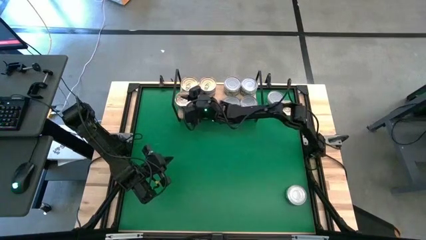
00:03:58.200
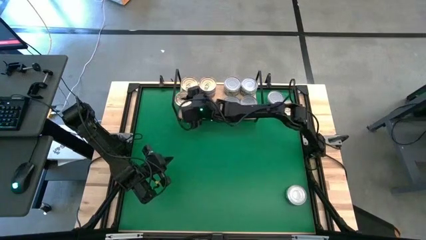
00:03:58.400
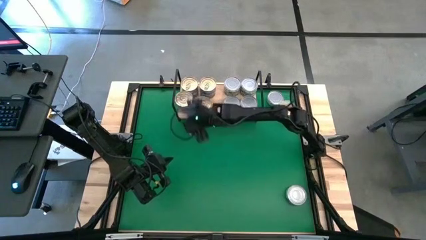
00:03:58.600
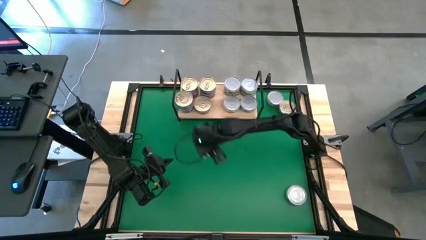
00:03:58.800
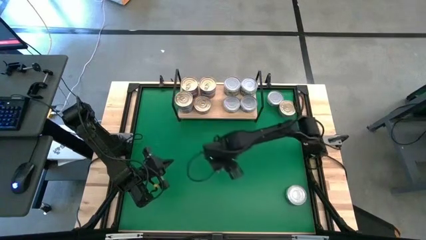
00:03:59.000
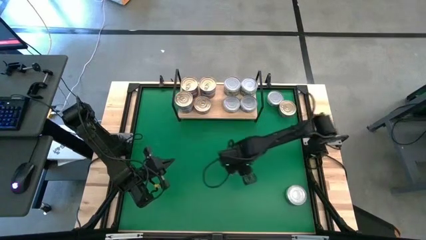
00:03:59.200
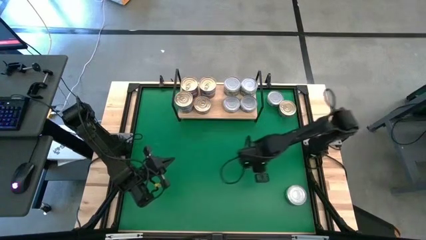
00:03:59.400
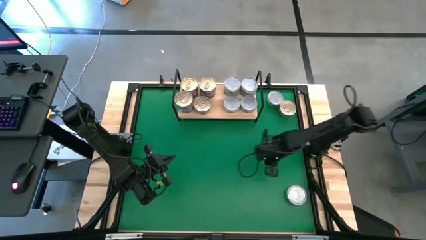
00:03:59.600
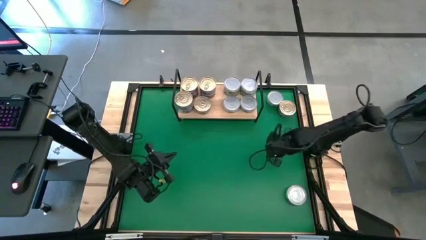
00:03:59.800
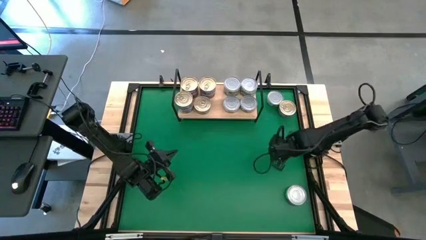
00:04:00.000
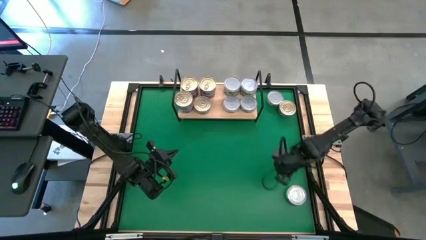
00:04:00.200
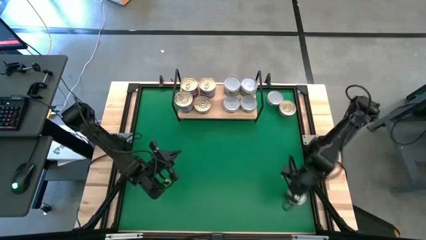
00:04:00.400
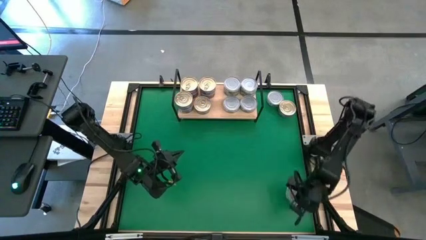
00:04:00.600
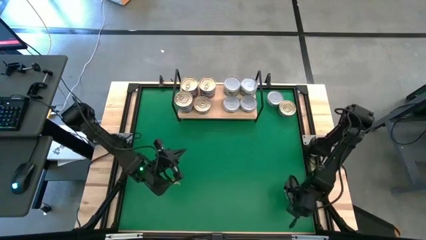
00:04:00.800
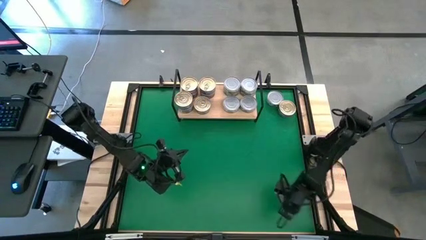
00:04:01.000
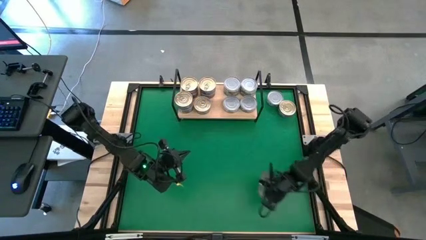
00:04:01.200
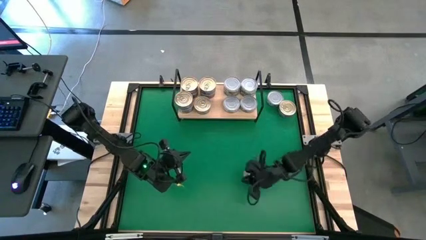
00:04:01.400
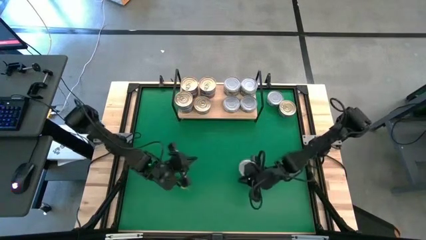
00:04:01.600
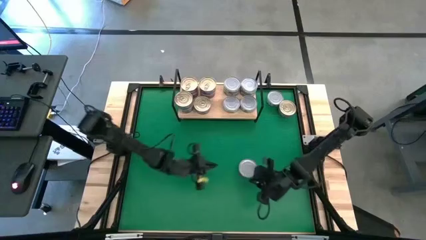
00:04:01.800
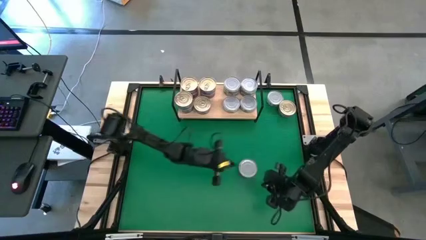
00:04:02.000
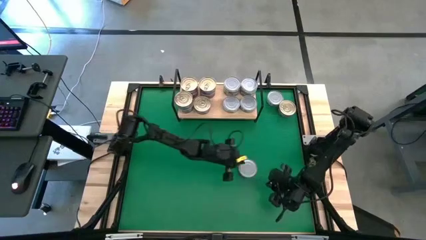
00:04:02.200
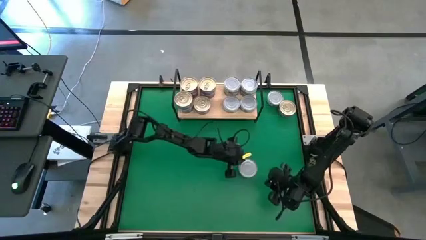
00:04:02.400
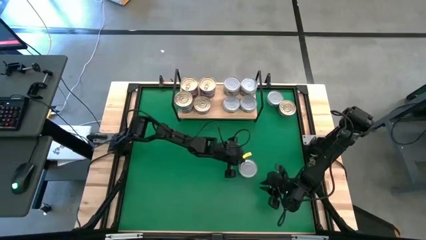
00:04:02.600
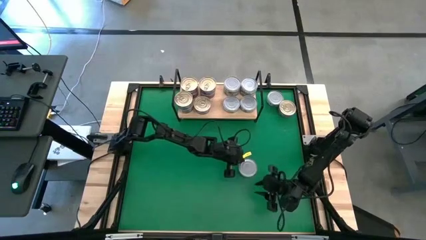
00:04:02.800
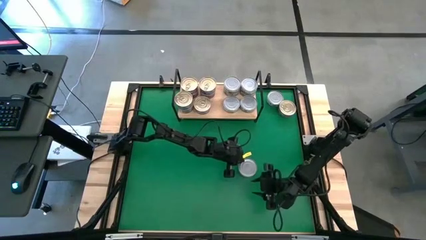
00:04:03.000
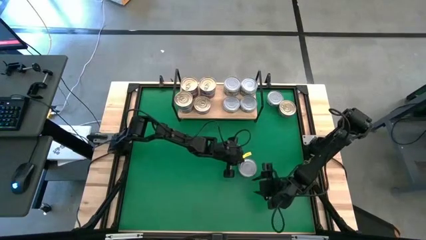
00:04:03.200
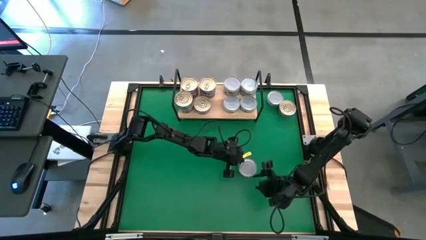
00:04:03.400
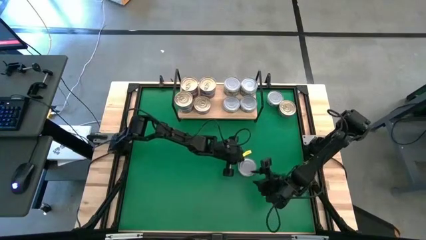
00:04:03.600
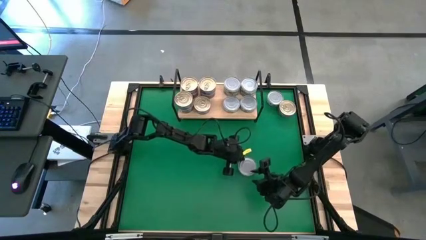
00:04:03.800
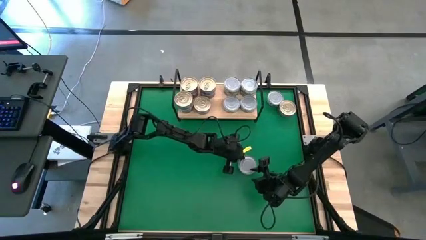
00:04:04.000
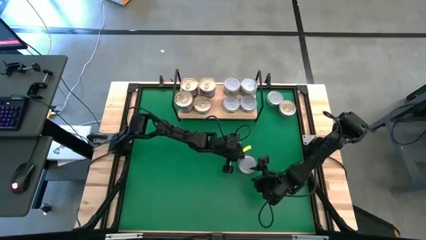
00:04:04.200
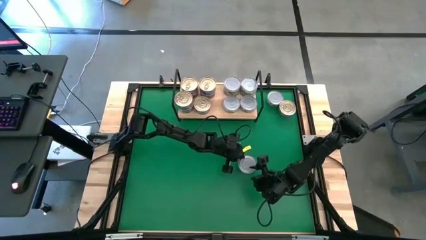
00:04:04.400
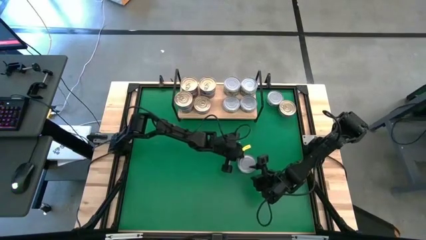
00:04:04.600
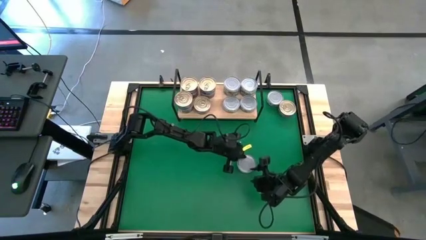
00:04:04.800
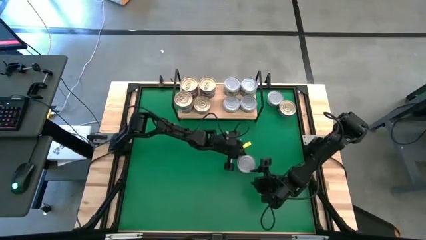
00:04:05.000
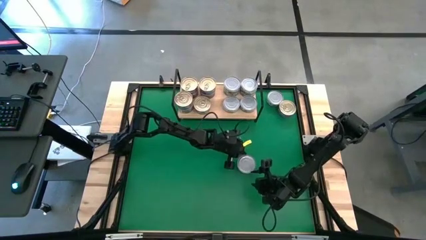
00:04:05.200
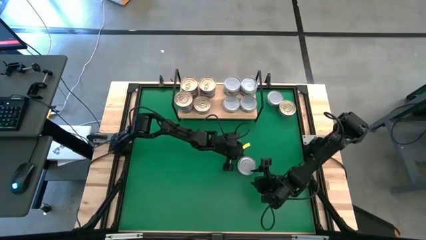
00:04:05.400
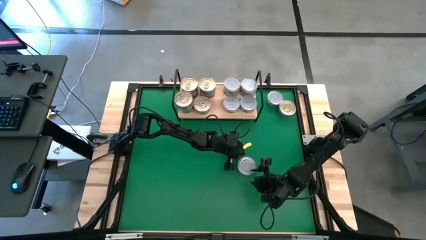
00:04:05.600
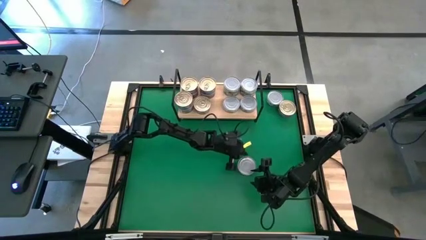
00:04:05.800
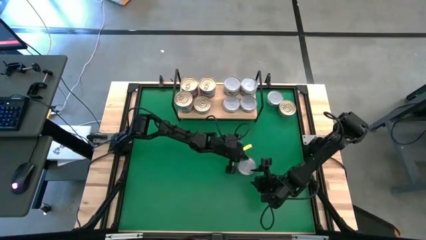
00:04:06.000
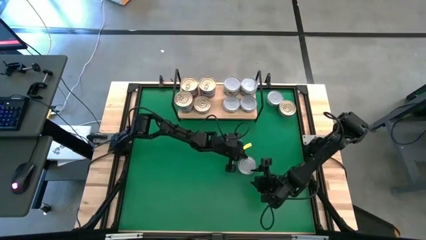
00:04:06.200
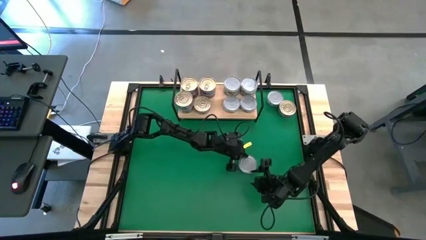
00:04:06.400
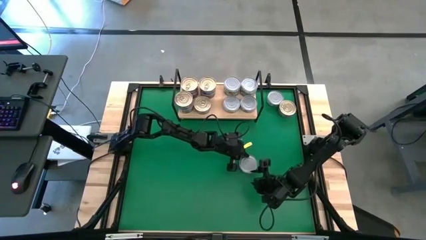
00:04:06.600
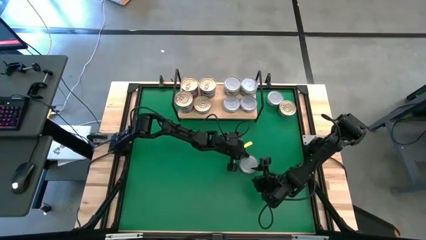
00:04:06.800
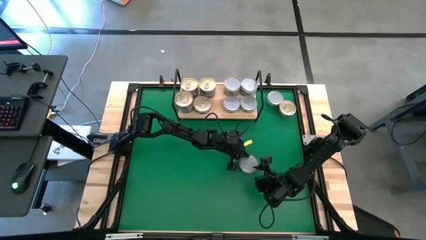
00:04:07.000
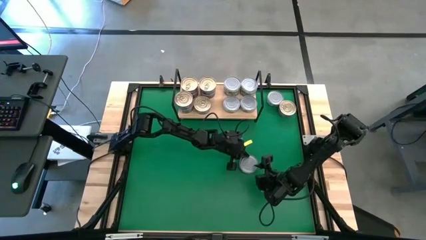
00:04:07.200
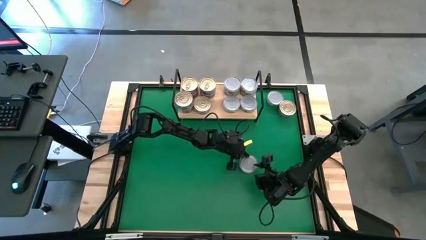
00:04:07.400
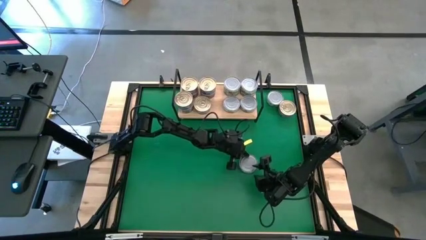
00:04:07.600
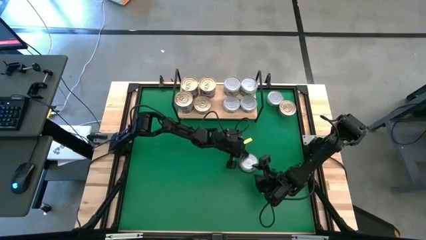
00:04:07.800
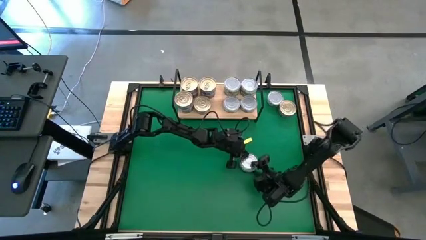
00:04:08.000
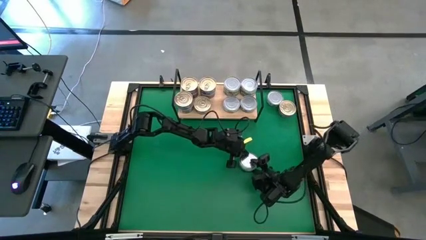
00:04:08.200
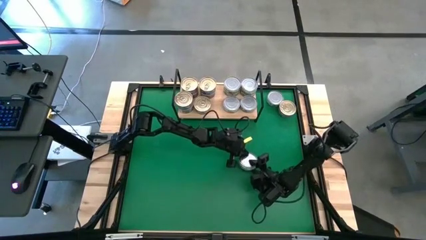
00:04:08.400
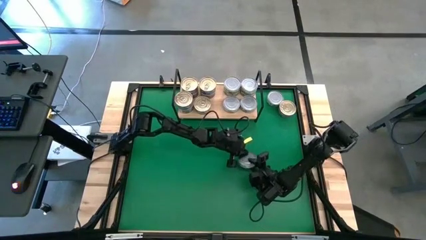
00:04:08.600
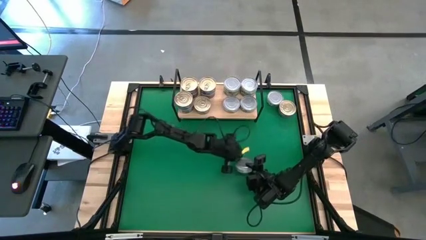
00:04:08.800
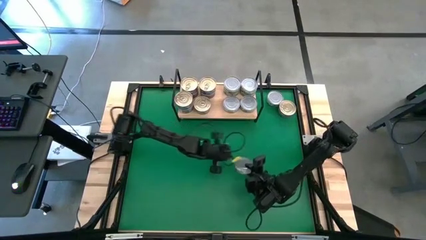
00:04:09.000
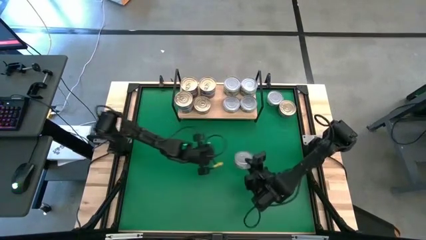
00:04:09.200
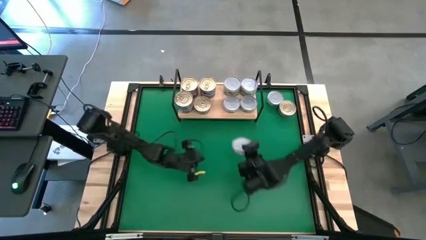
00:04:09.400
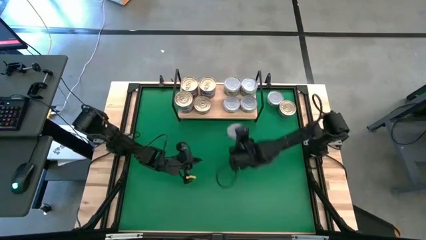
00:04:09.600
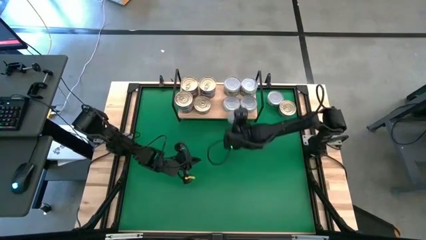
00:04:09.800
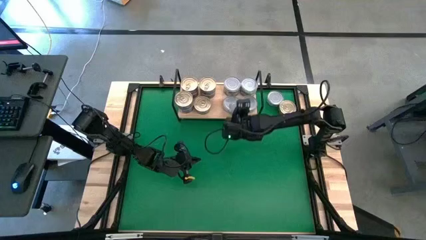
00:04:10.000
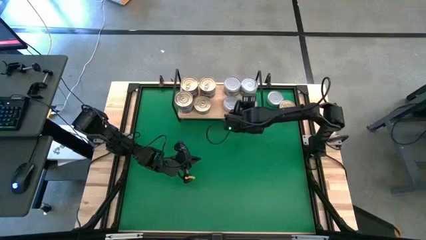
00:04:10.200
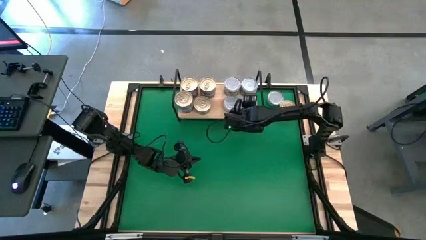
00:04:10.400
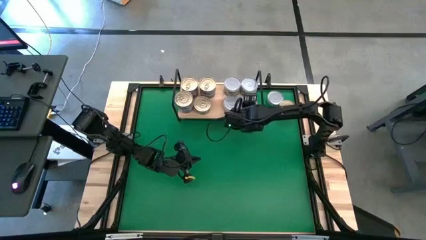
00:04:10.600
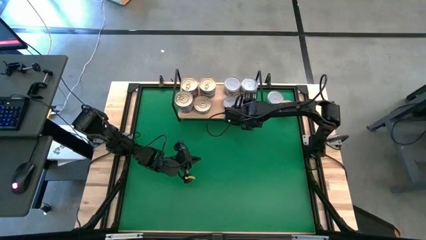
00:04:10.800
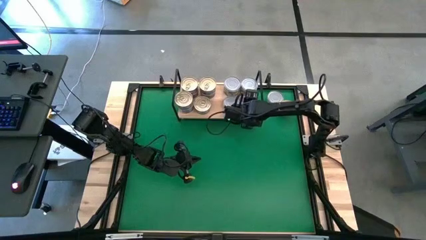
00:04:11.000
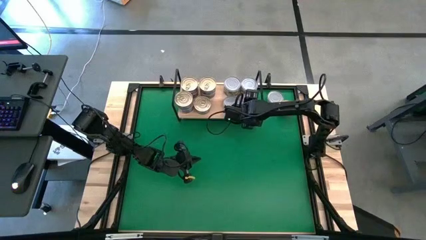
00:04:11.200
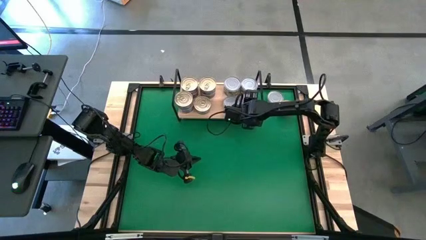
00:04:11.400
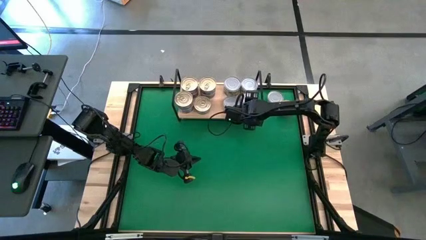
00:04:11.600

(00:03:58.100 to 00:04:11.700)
Task: Stack canned seafood by type on shelf
Stack the green white tuna can on top of the other green white tuna can on the shelf

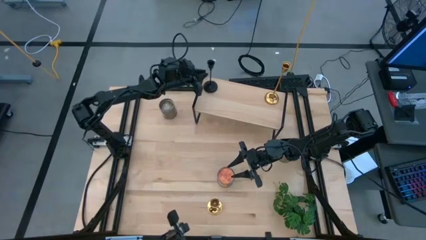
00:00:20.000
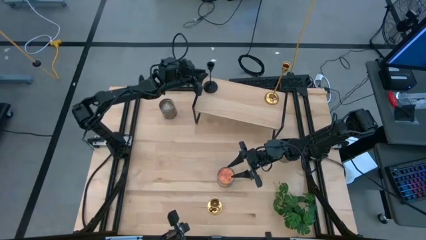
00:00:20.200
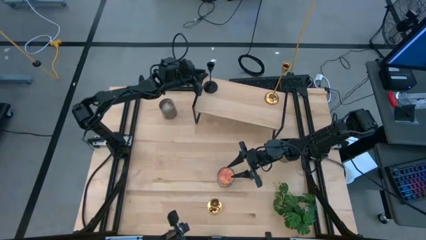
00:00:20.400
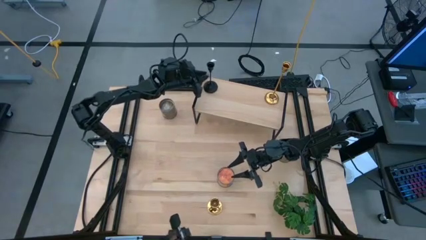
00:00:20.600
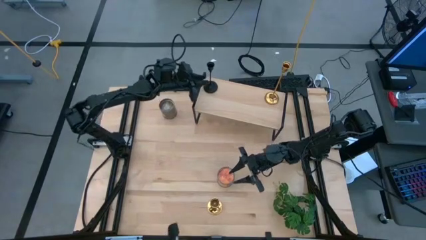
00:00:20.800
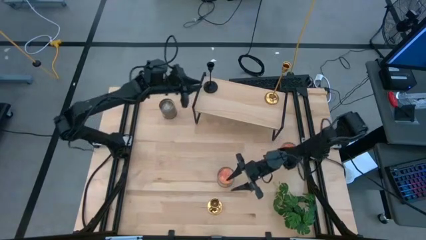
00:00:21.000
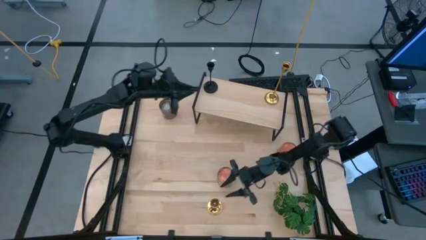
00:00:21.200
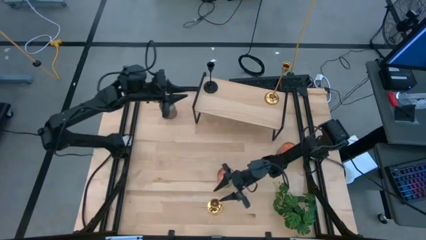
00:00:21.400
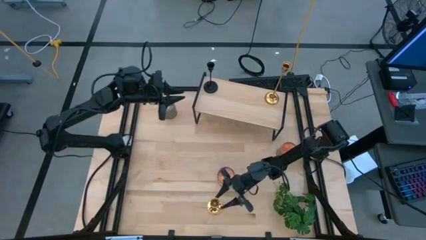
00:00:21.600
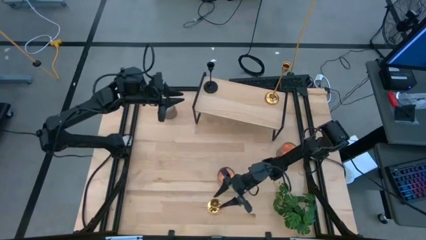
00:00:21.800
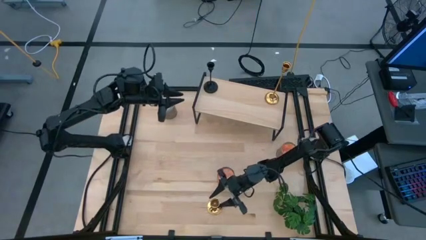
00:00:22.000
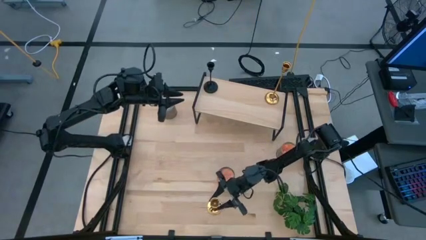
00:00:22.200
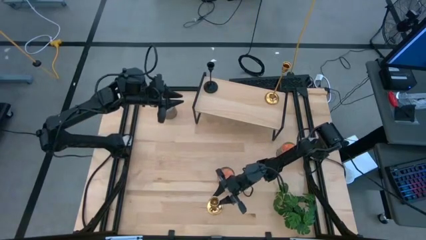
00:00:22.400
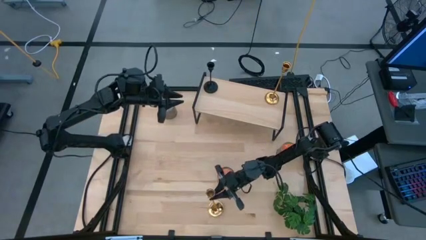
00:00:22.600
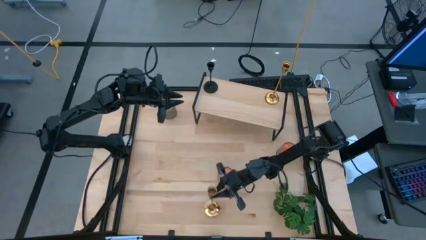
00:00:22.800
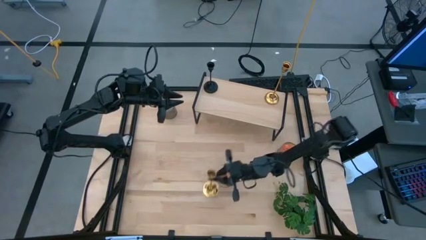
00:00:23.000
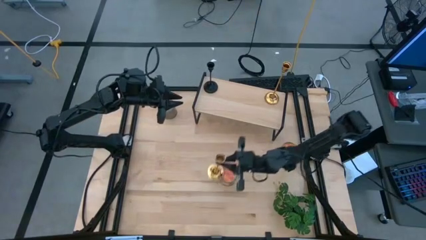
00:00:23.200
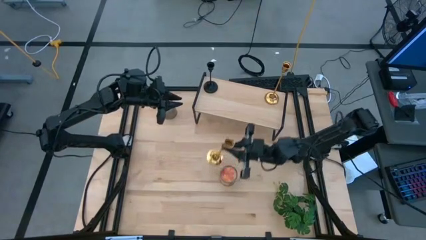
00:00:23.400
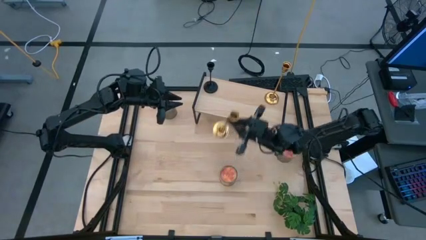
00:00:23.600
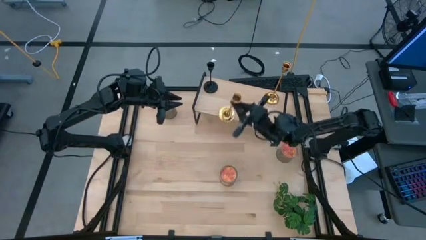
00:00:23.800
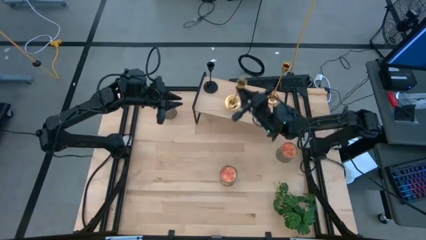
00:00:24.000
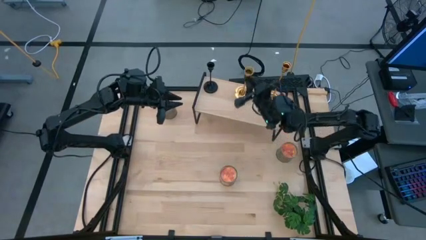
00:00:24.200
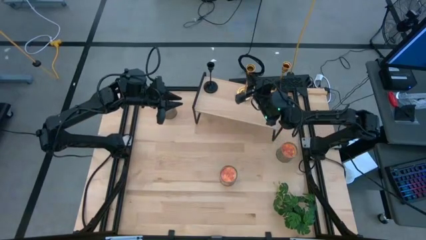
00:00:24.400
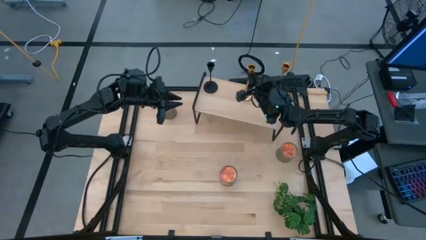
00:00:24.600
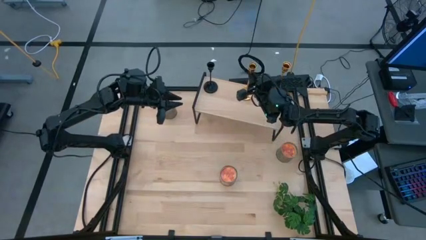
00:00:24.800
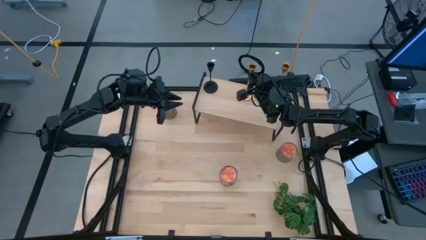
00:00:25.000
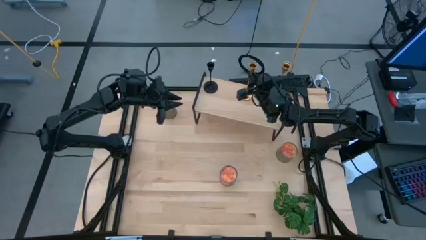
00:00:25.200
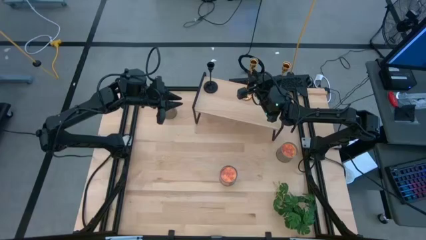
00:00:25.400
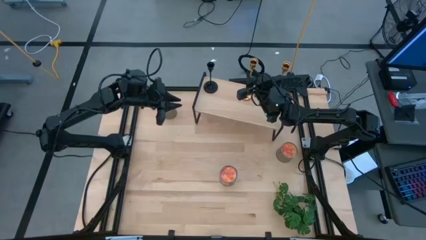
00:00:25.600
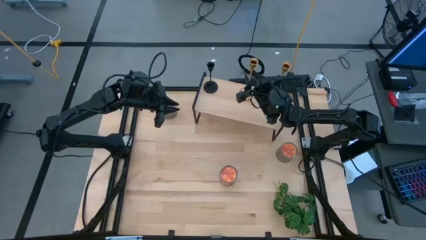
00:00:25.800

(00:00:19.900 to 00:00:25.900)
Task: Pick & Place candle stick holders
Put the gold candle holder on the shelf
